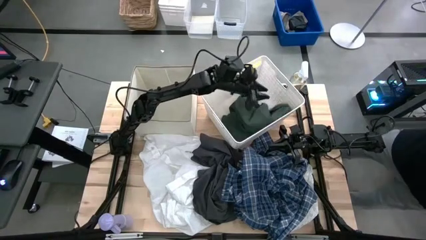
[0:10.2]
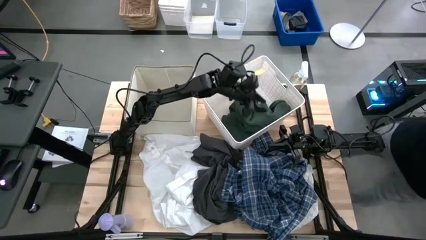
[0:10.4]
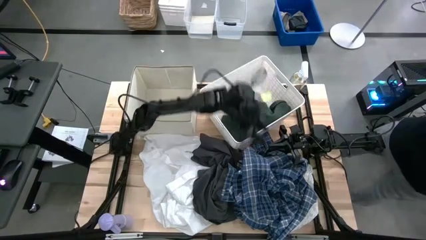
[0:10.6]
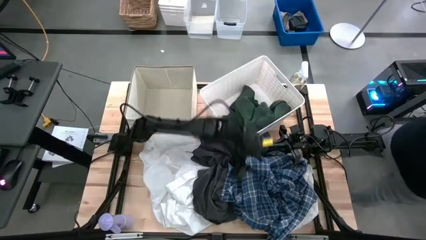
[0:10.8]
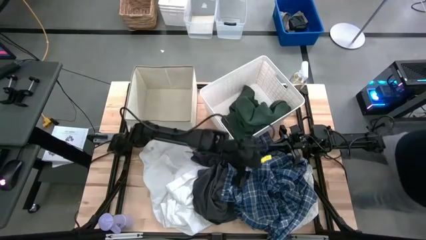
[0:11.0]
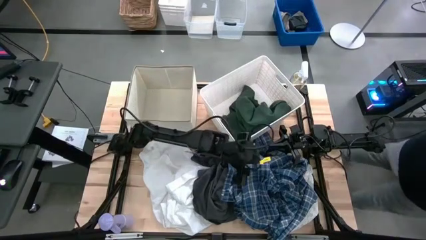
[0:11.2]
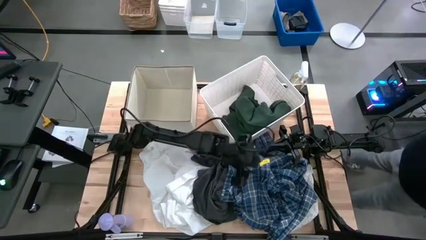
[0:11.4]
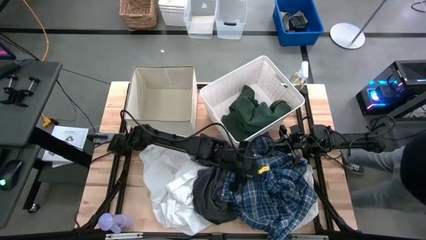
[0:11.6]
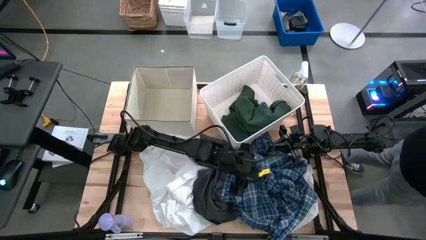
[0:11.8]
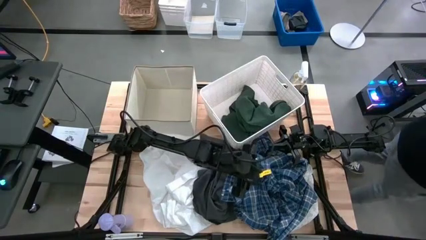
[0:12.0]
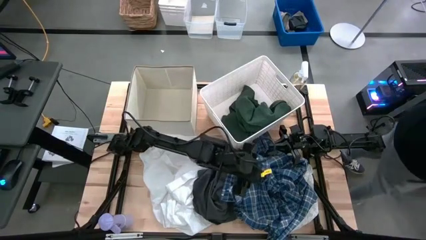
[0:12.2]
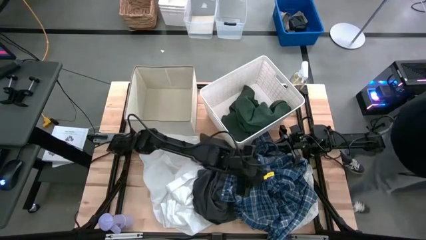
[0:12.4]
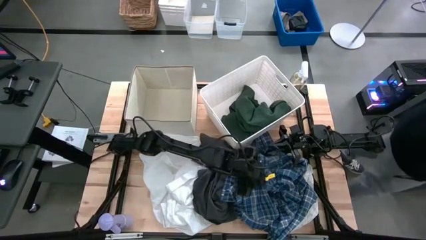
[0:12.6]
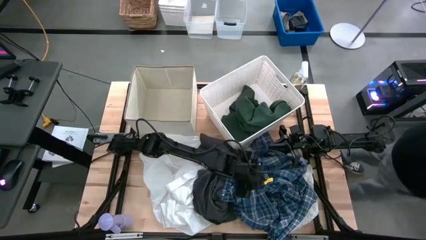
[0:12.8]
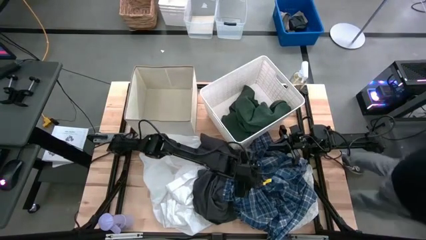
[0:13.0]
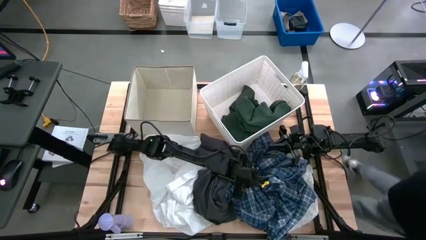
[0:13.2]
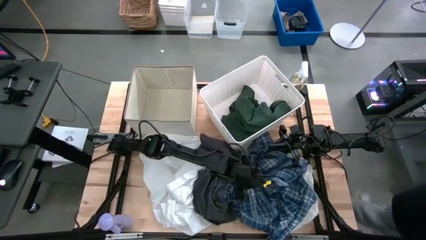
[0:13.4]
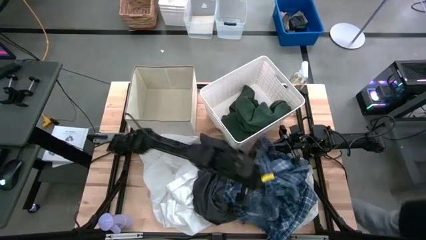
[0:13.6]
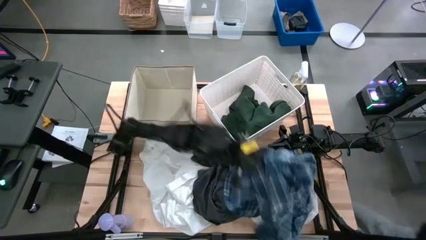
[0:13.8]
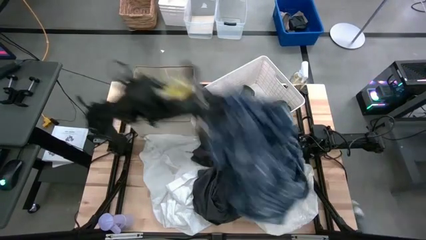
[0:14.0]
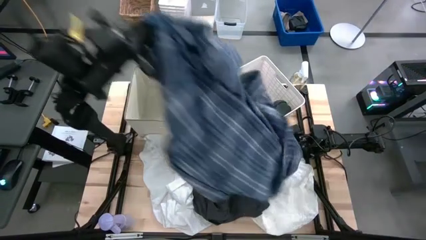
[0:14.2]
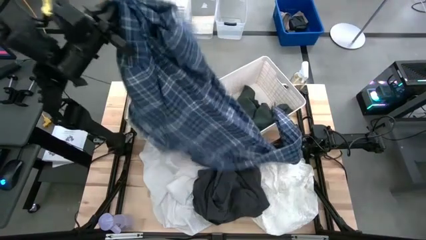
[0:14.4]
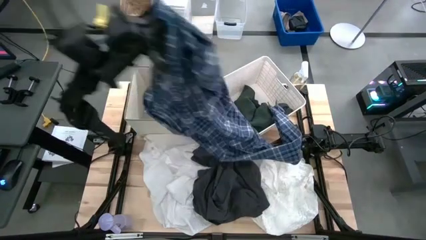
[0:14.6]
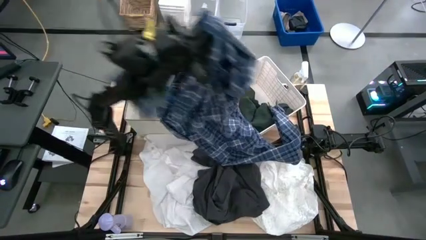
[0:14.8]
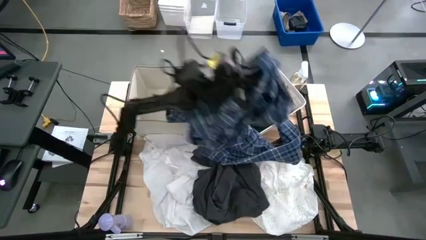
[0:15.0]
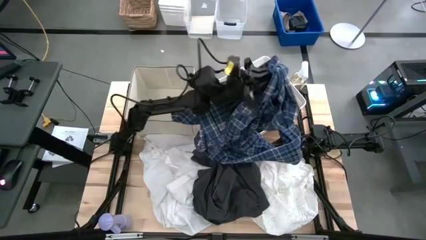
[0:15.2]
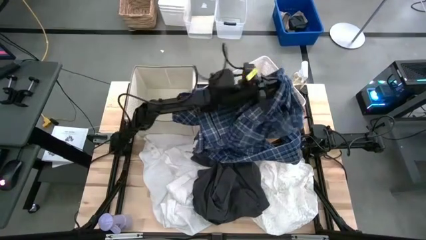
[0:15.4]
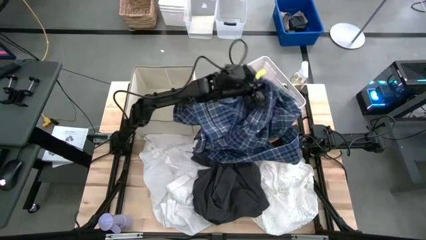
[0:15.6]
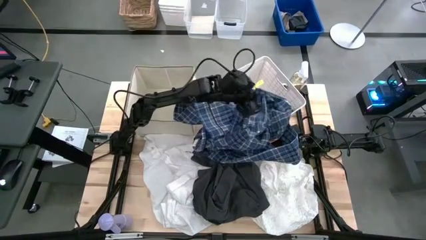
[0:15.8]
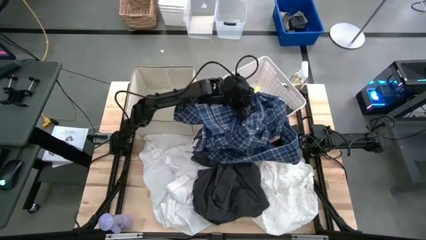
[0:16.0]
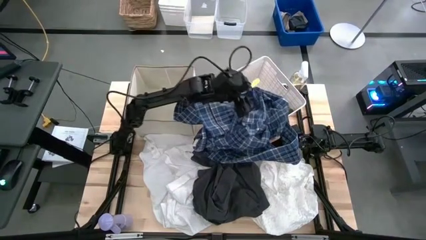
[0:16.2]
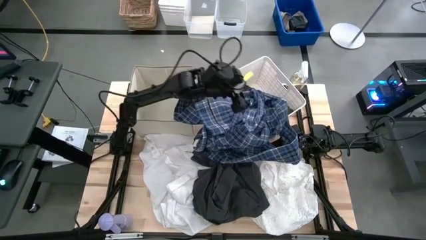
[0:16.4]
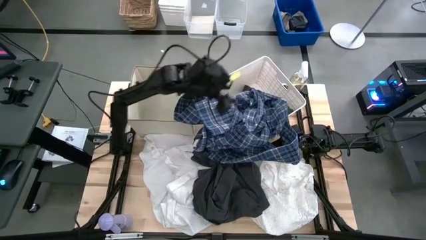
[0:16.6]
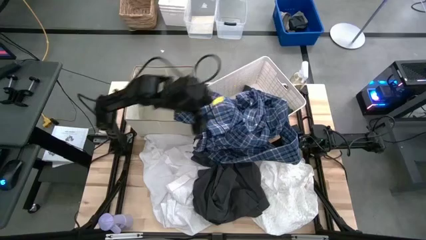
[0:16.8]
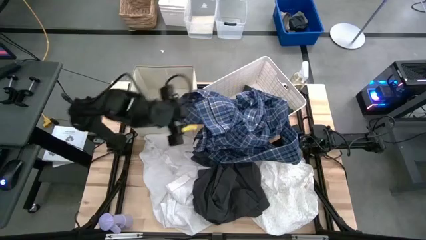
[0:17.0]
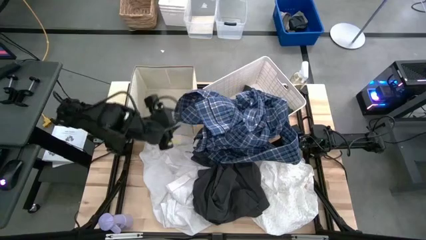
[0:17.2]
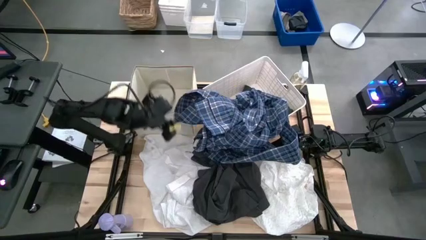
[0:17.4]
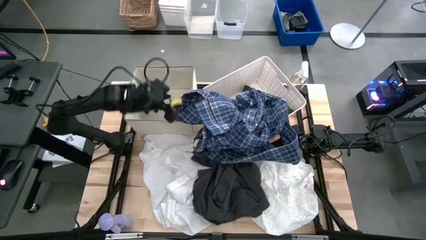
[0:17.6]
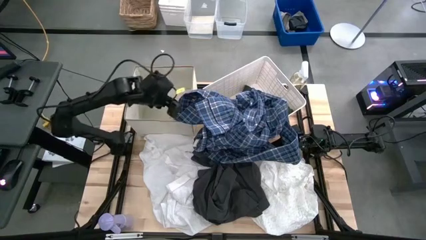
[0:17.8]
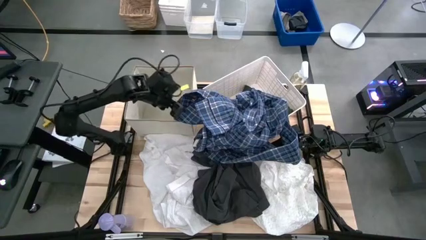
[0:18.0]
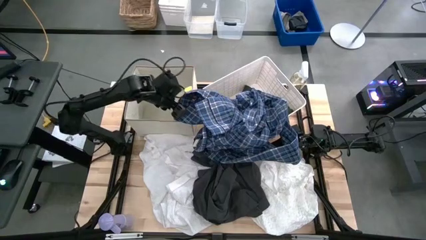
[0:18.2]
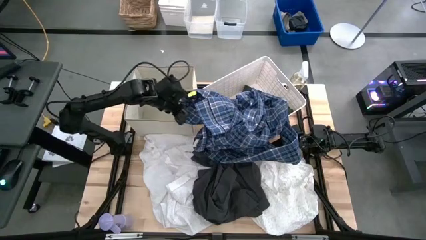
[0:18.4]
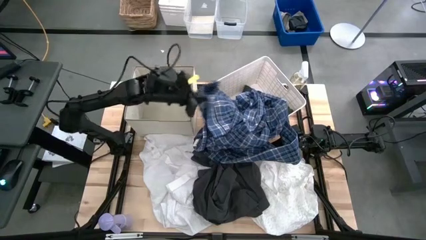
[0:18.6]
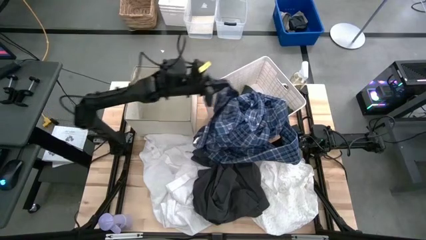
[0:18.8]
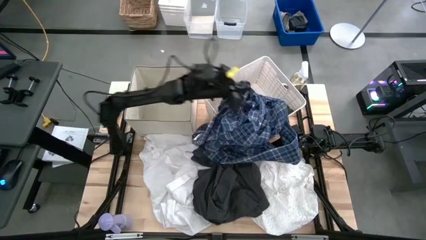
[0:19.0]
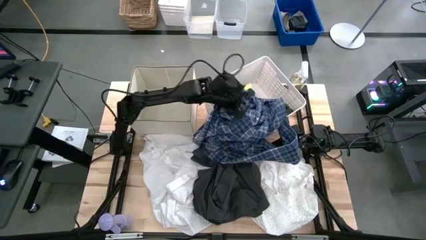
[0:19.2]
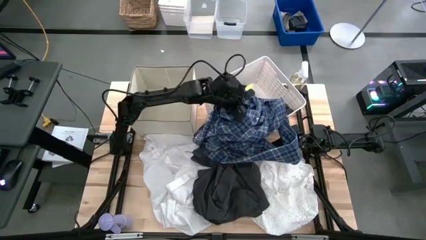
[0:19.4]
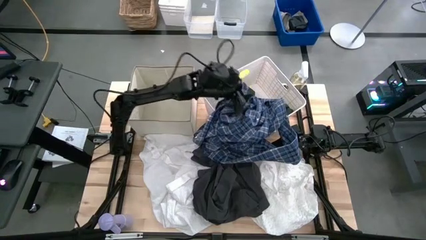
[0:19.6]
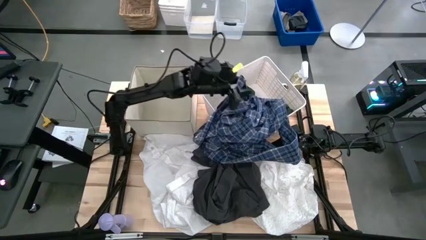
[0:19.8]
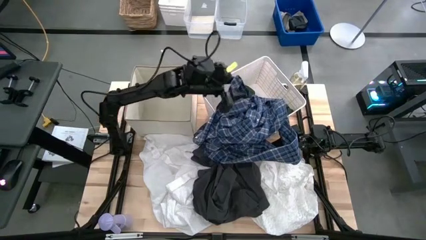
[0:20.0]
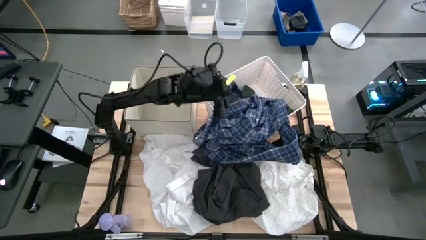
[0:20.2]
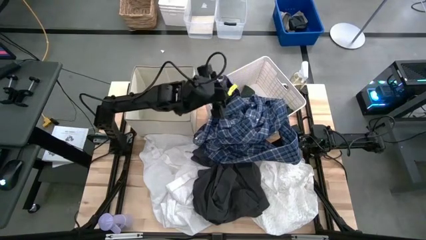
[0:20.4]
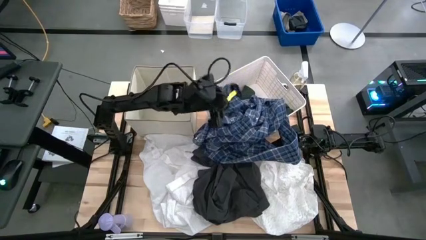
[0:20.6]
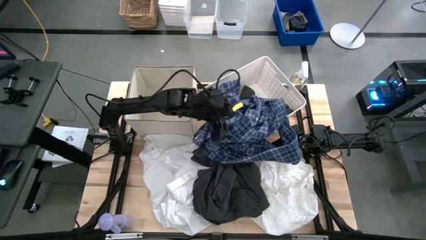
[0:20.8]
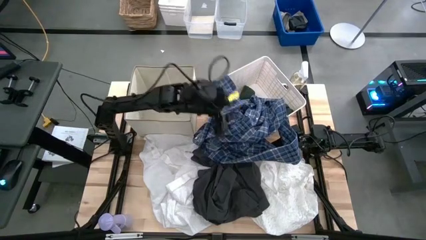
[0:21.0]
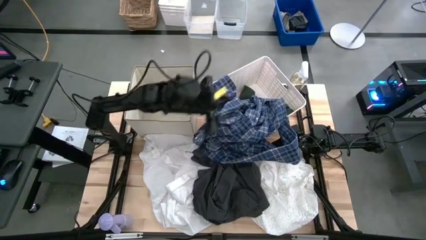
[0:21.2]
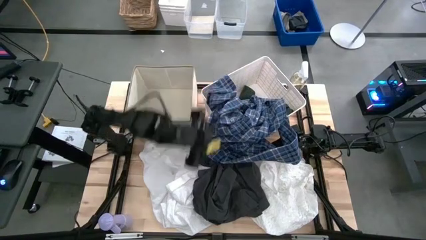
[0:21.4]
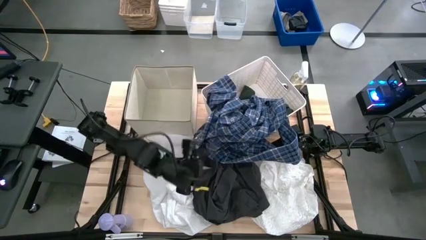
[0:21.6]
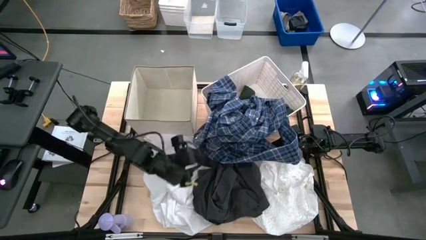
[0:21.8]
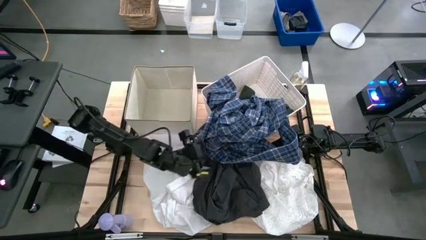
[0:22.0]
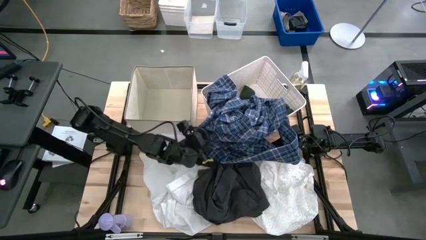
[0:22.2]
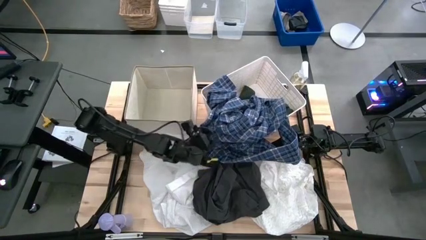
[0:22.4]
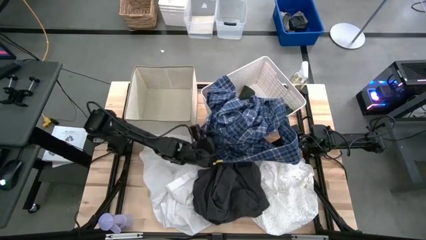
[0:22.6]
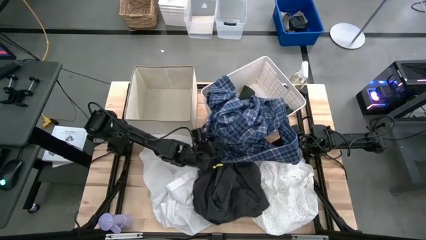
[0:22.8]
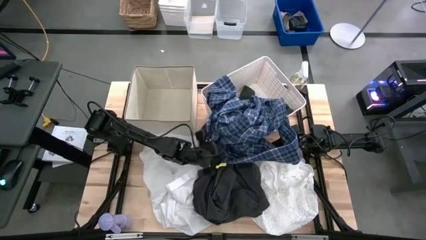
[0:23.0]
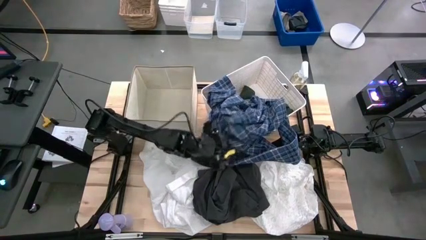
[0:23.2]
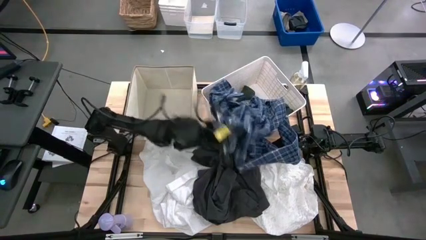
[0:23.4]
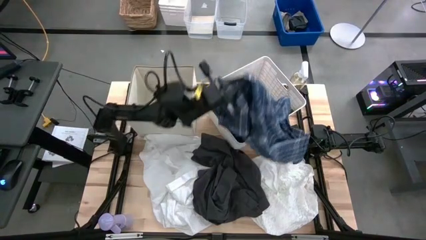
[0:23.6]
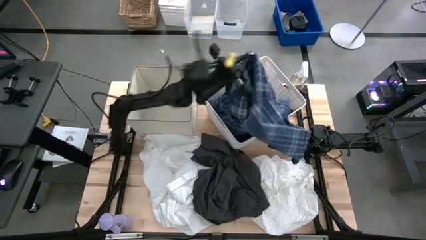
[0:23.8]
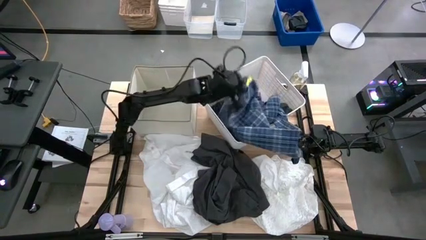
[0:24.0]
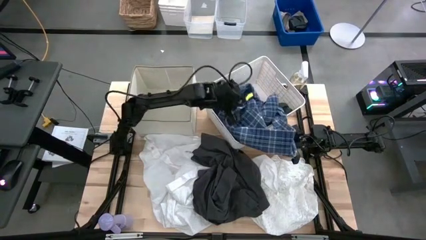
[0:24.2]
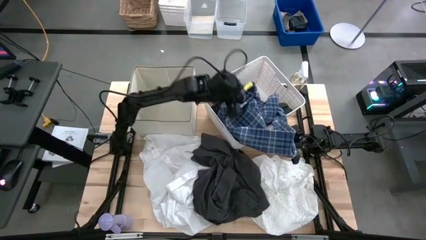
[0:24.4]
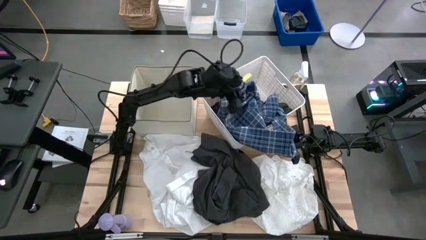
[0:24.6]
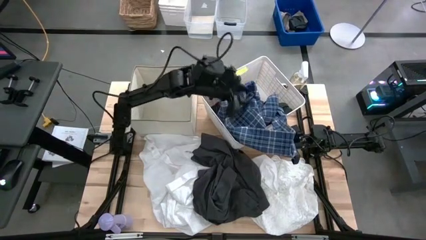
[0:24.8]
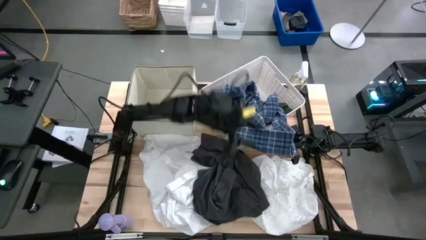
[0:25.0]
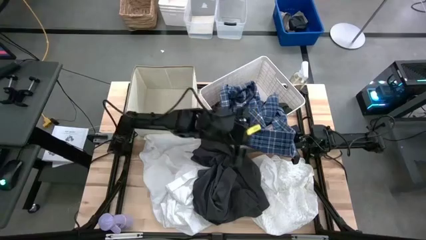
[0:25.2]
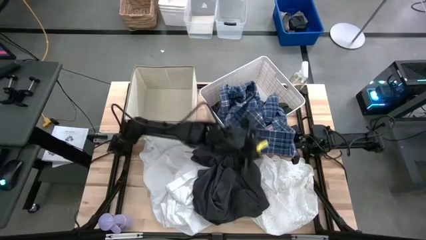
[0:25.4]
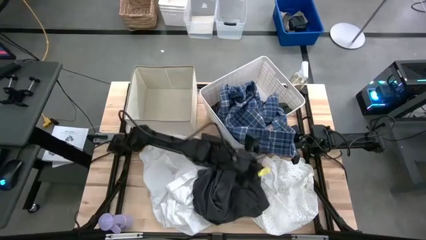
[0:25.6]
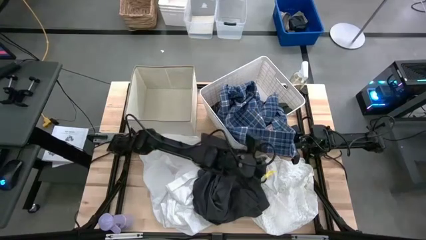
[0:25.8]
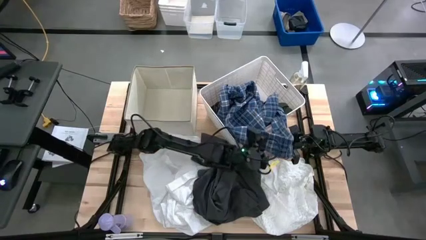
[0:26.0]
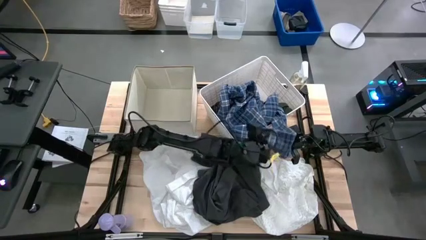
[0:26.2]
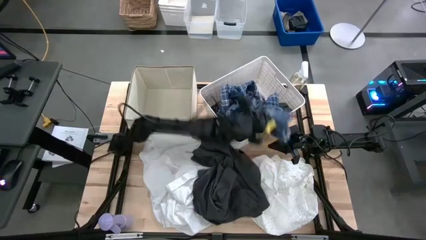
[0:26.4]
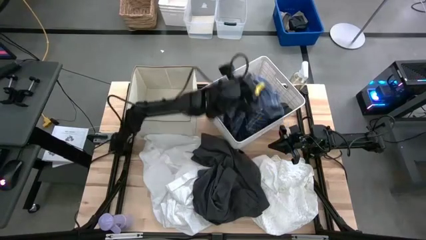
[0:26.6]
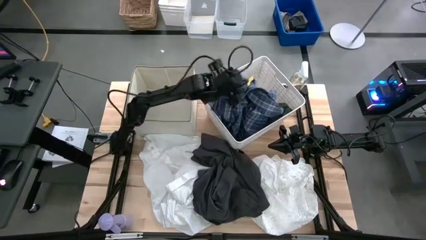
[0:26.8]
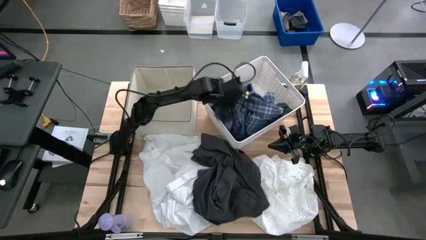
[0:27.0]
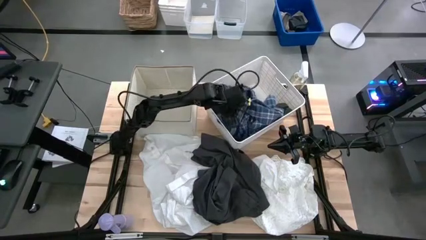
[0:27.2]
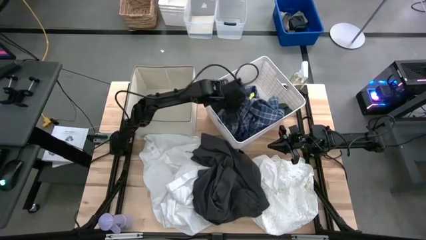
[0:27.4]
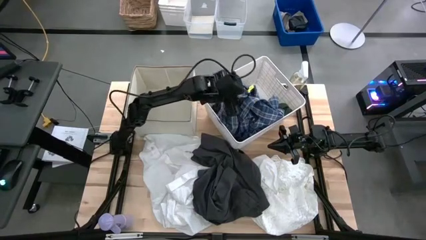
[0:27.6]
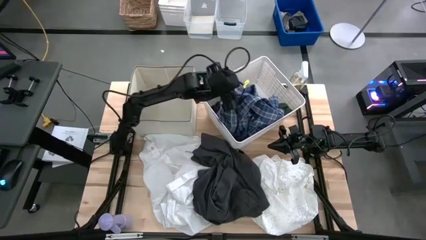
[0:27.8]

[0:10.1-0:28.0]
Task: Sort clothes
Put the blue shirt into the white bin
